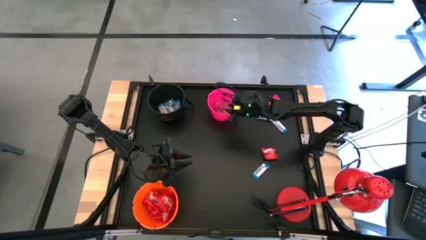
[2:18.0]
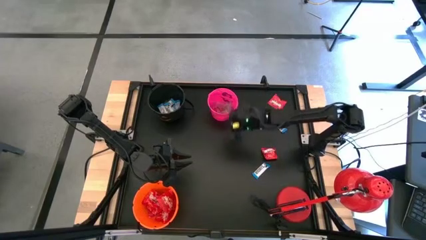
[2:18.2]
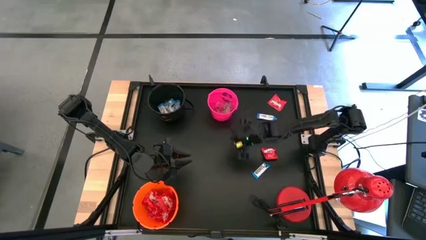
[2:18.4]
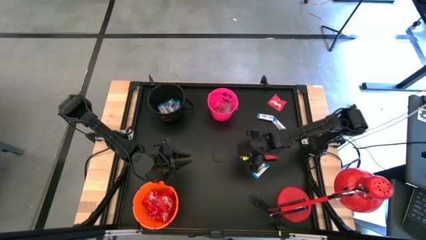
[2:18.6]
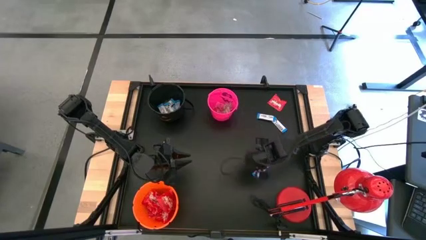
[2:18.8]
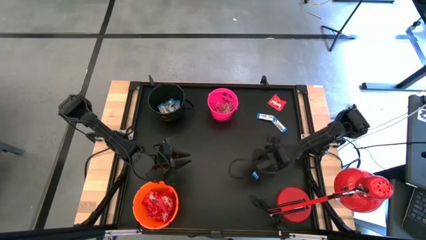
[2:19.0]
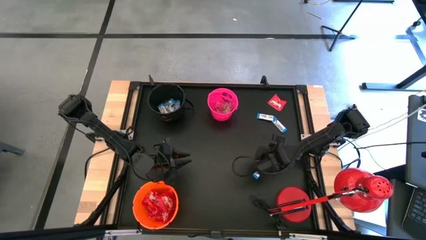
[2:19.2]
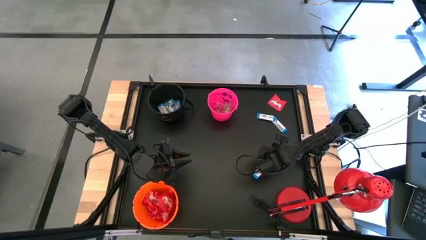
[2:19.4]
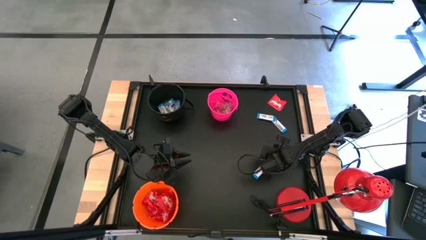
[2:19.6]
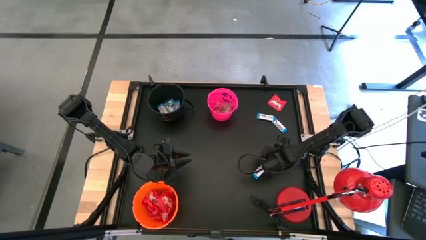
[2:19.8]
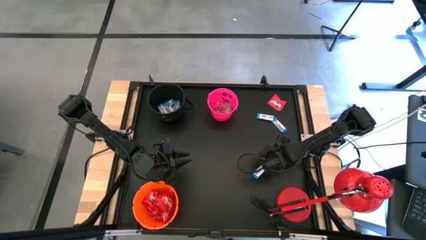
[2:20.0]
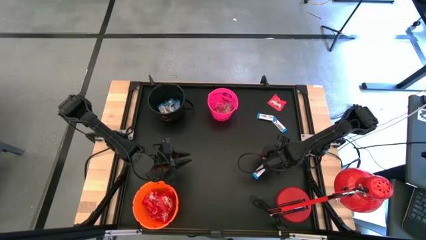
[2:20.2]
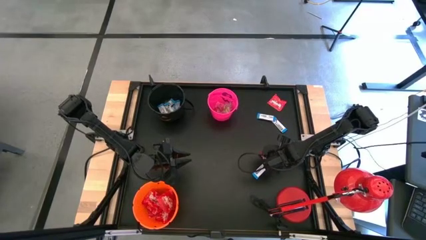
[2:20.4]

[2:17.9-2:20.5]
Task: Organize candy in baskets
Put the red candy into the orange bucket

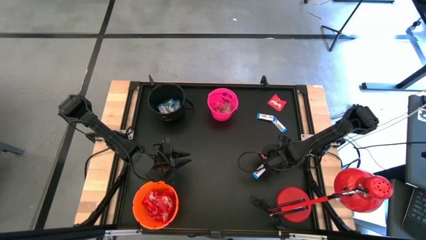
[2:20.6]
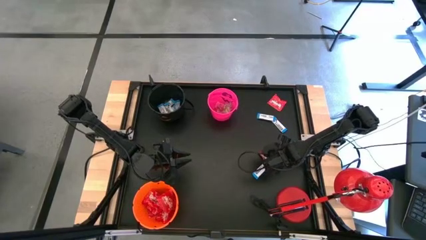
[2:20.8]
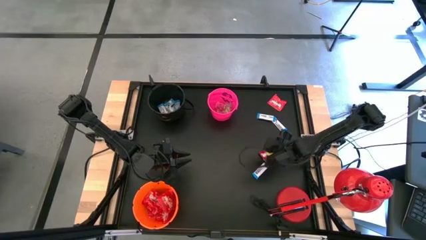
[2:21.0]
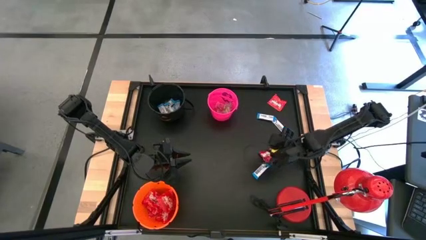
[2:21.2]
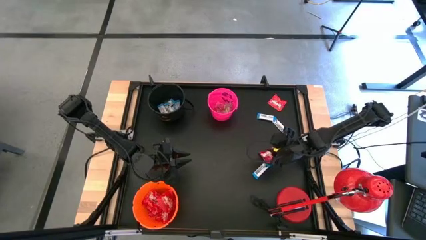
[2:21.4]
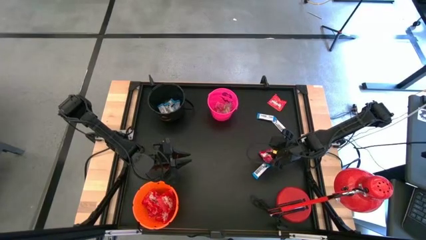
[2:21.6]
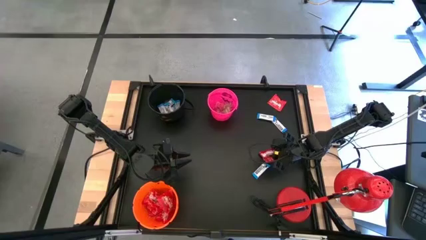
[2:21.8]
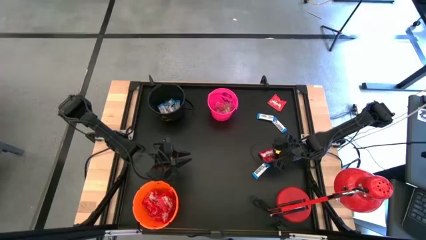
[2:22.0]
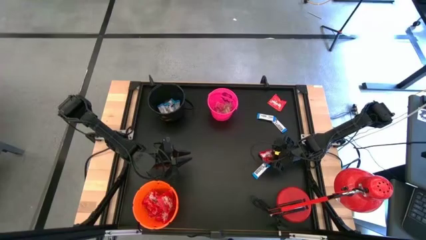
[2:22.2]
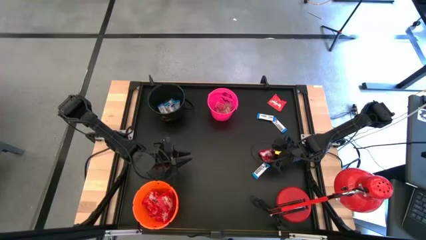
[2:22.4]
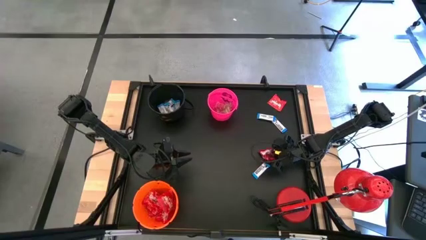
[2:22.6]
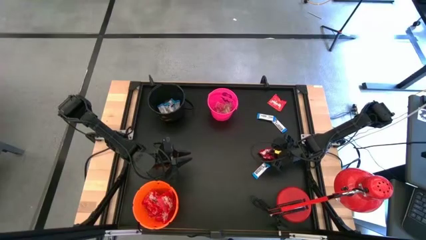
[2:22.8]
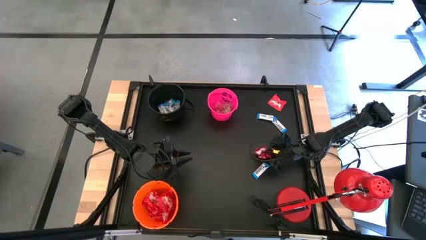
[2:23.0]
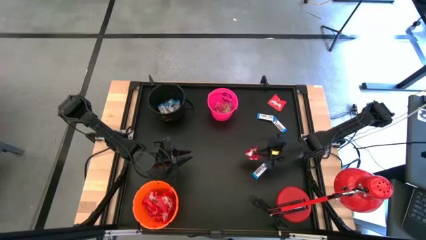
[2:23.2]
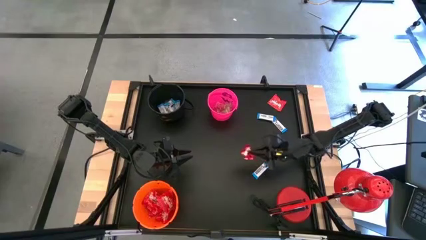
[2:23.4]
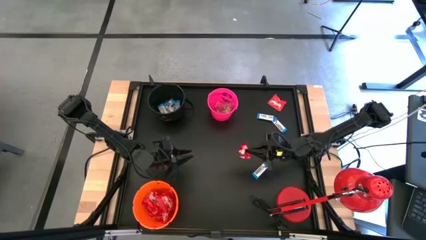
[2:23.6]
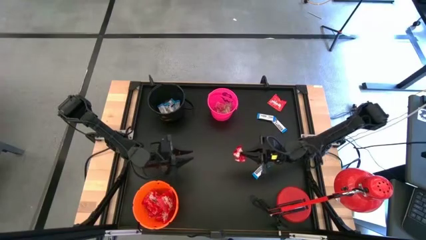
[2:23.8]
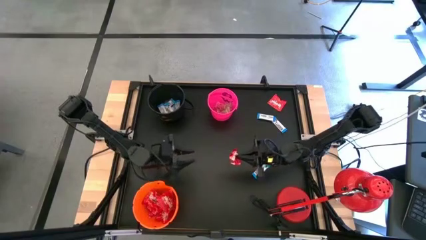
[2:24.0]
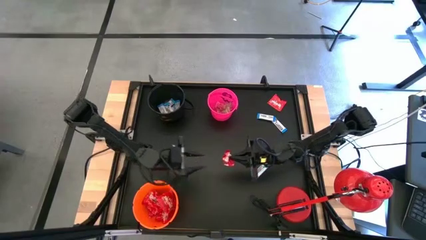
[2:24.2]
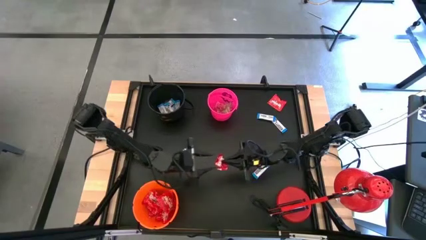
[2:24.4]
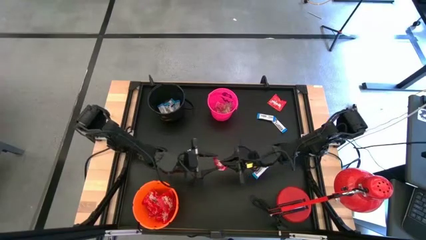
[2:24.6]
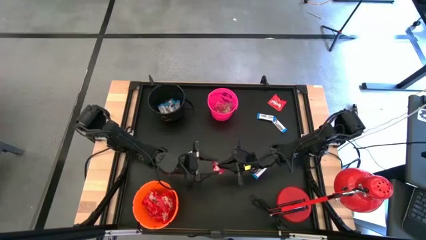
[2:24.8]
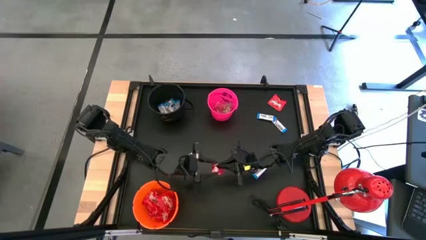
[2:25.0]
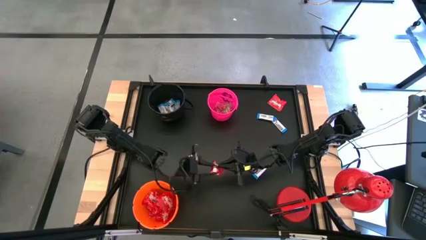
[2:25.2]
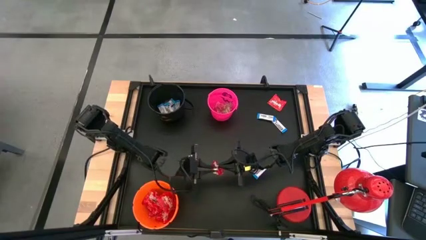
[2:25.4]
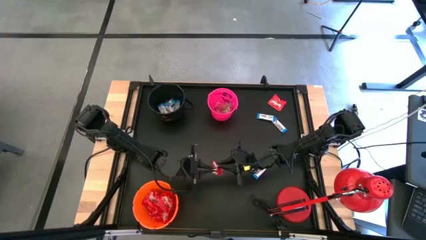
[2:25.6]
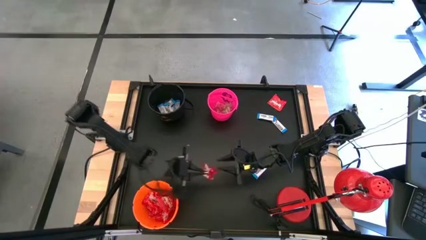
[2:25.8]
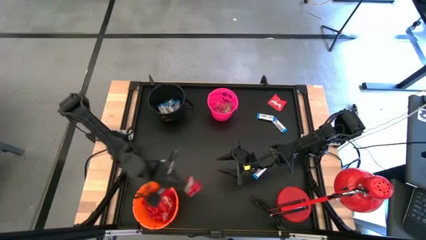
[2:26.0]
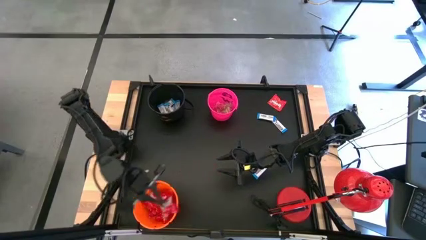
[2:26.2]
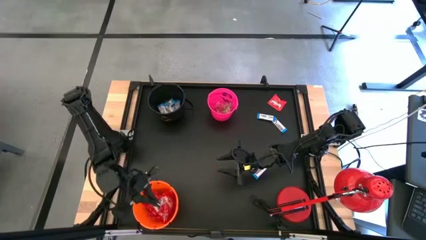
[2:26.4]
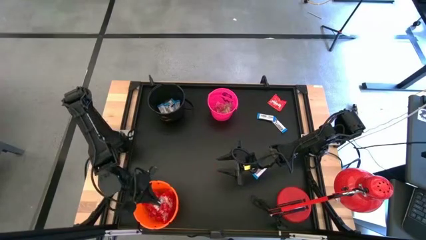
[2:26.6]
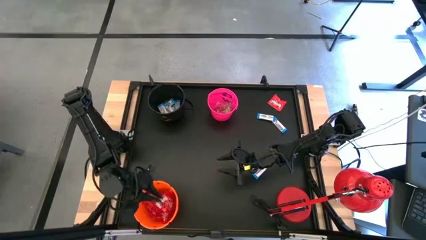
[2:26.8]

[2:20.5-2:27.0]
Put the red candy into the orange bucket

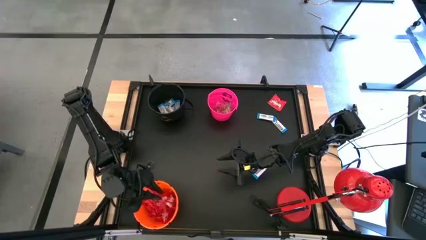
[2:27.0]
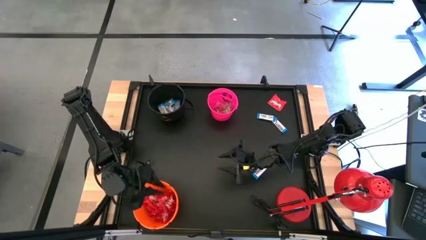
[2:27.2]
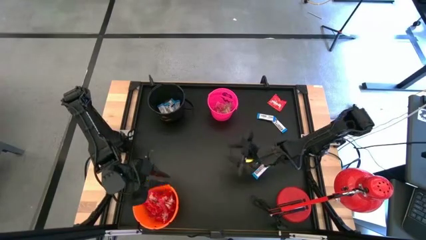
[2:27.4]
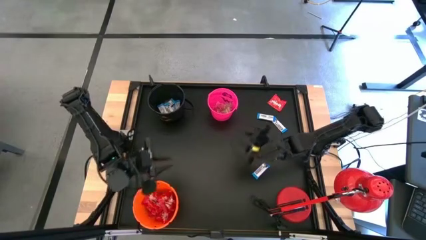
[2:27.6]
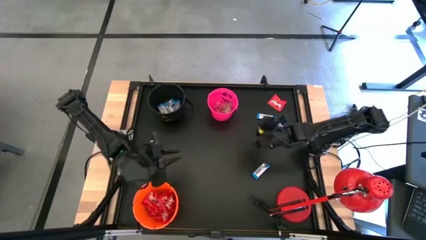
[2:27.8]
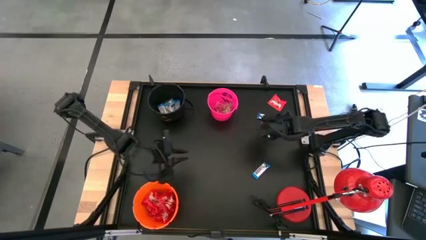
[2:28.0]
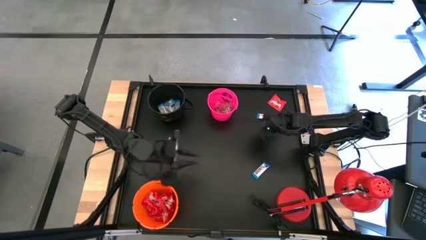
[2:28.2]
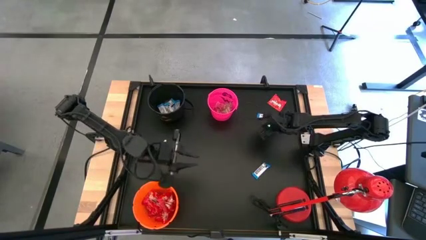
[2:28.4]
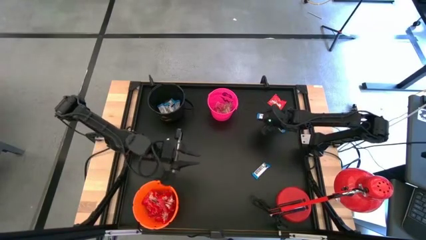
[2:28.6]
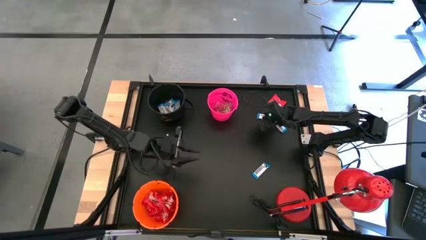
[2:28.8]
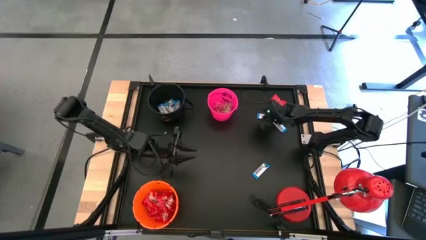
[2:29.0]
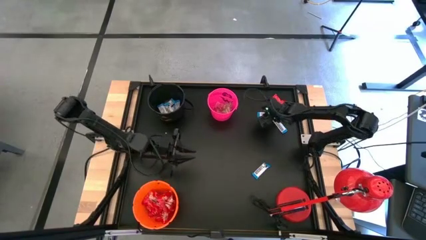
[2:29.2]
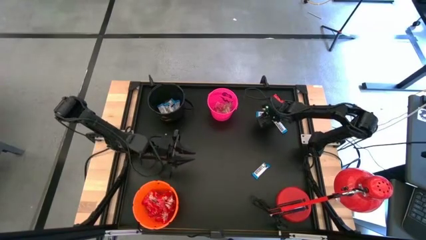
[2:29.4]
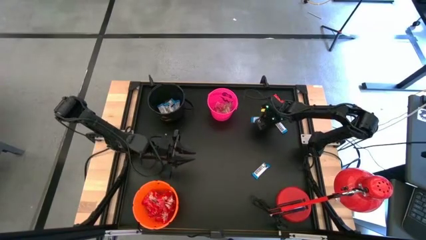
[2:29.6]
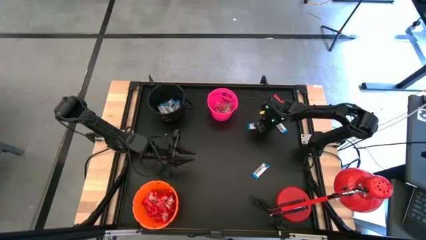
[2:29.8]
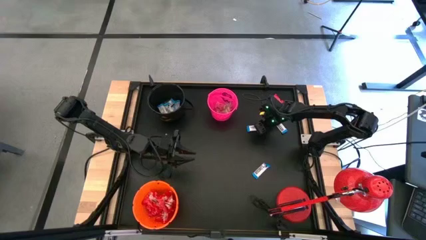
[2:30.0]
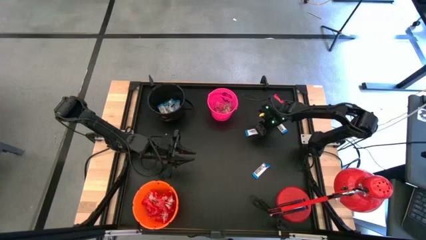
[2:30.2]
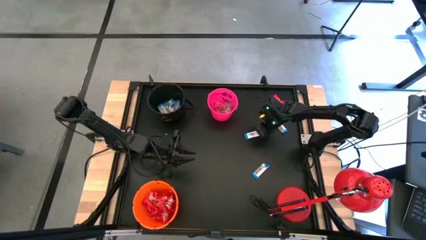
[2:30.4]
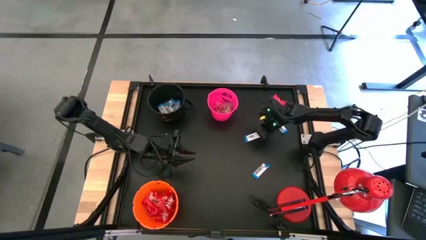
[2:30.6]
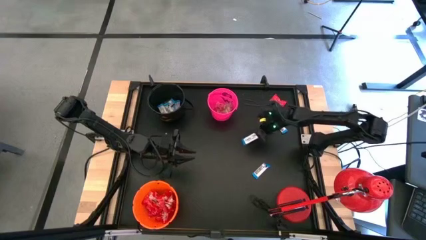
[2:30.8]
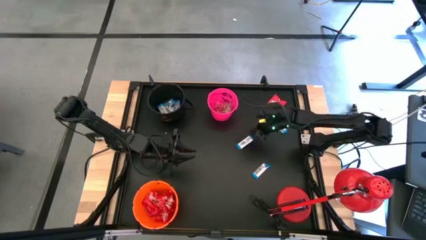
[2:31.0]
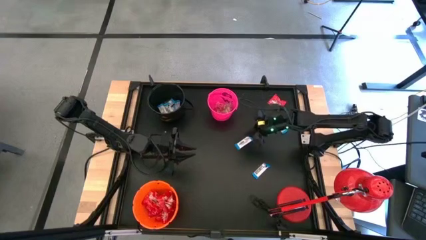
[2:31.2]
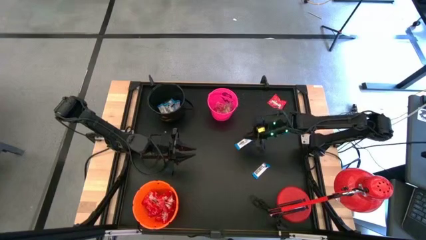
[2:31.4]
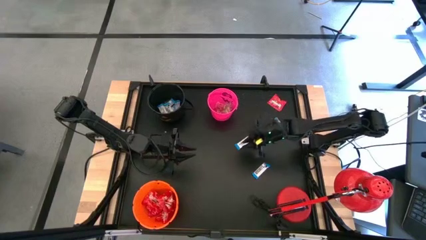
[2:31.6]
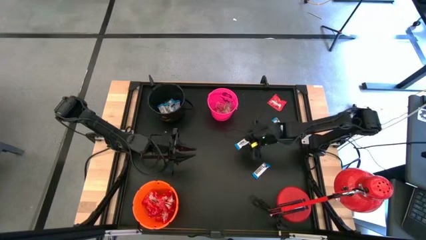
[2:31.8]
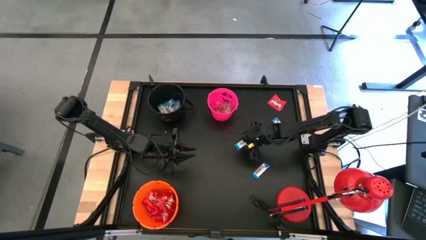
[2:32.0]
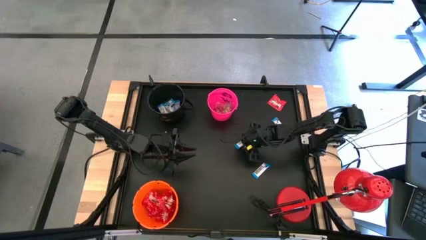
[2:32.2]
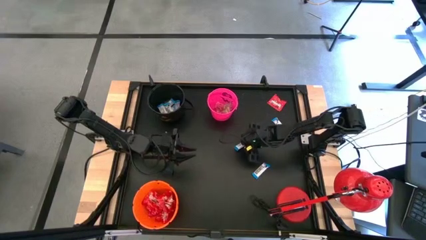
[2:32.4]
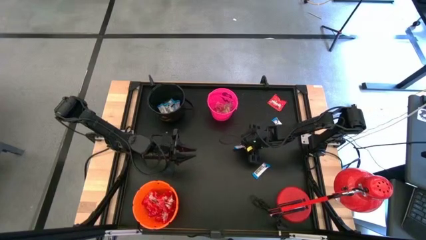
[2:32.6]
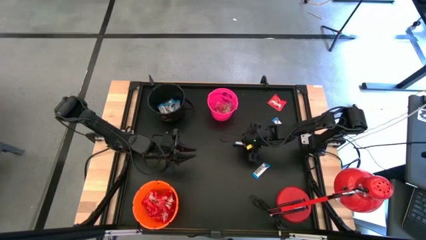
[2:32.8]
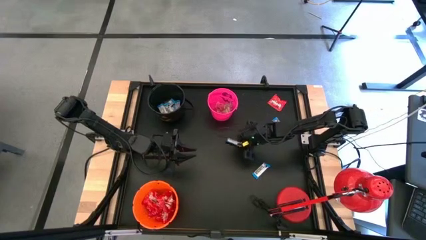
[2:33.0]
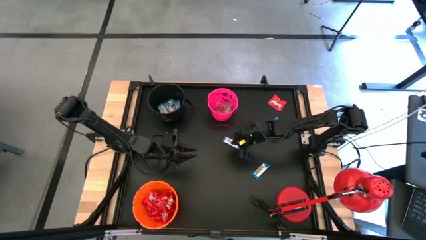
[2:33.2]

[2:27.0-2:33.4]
Put the white chocolate bar into the black bucket
